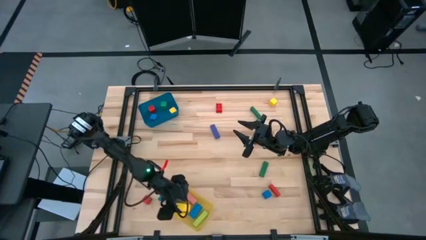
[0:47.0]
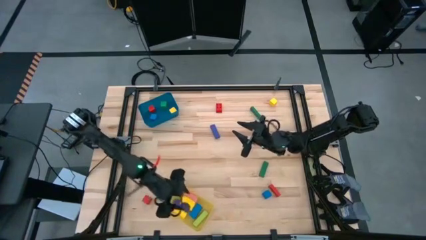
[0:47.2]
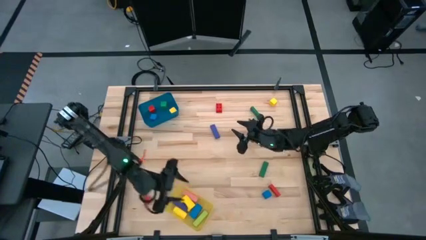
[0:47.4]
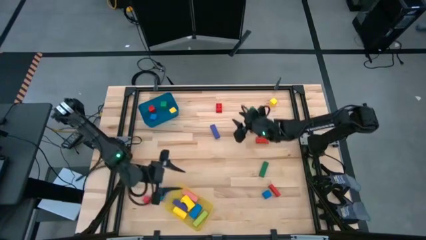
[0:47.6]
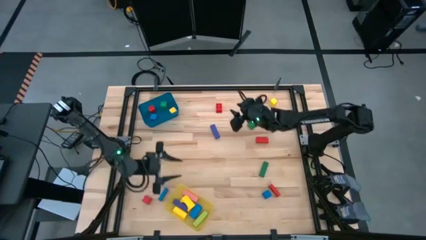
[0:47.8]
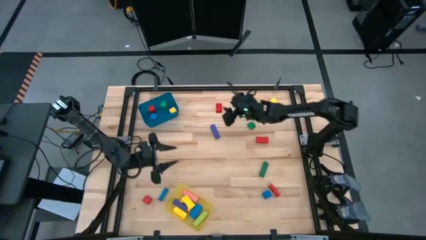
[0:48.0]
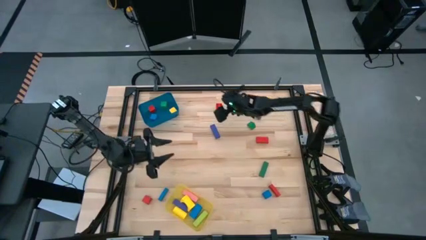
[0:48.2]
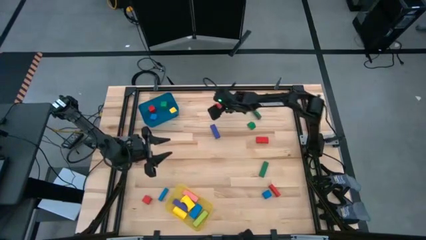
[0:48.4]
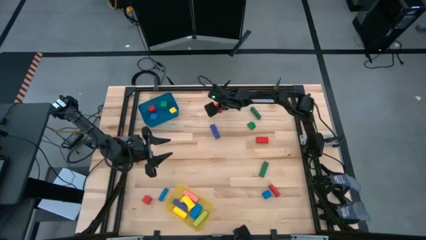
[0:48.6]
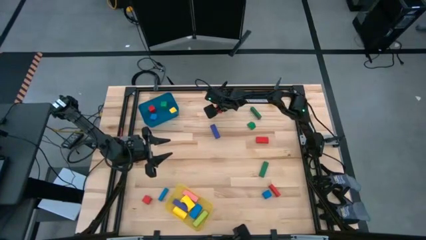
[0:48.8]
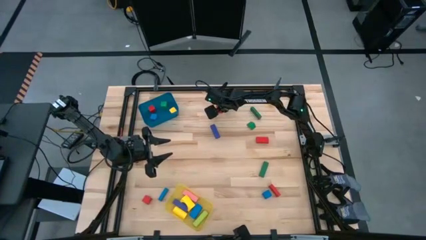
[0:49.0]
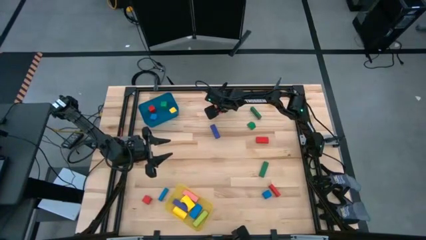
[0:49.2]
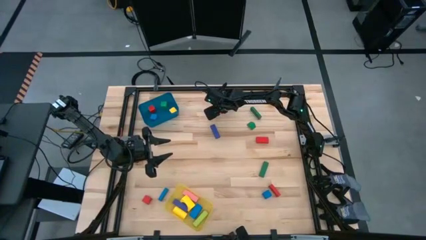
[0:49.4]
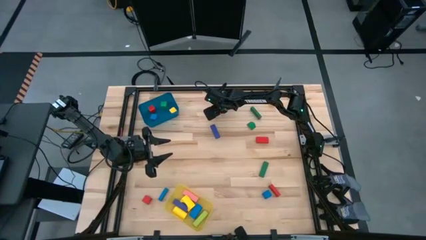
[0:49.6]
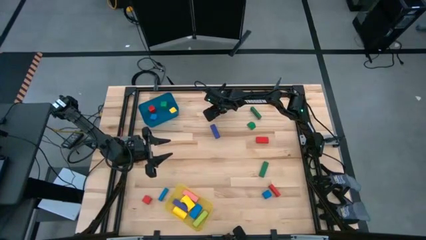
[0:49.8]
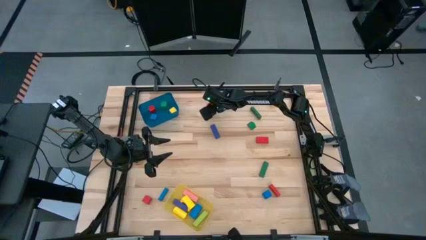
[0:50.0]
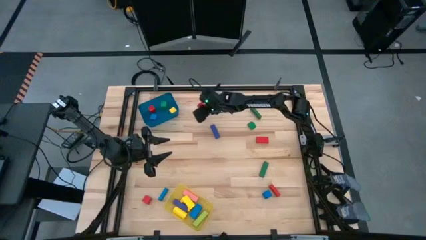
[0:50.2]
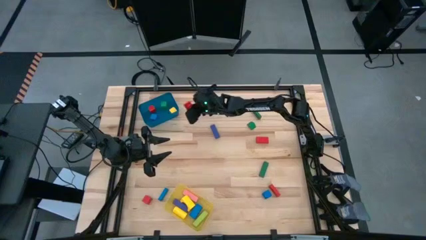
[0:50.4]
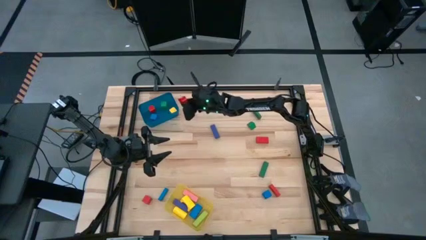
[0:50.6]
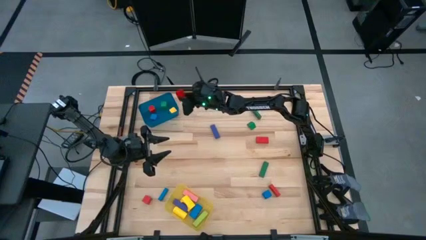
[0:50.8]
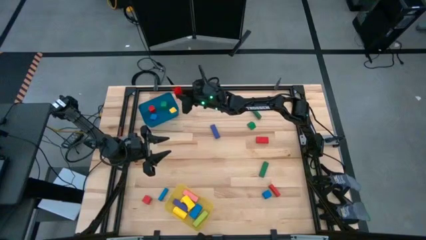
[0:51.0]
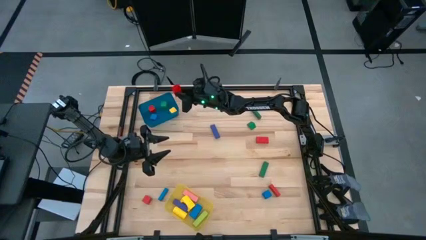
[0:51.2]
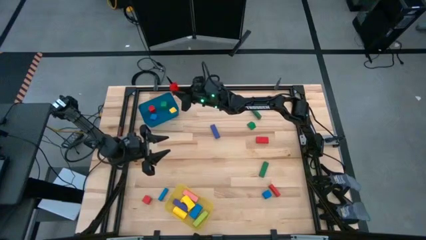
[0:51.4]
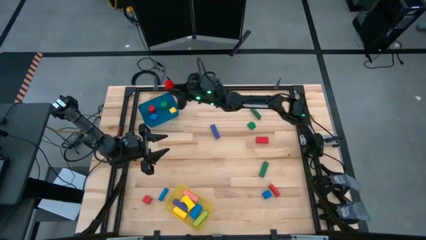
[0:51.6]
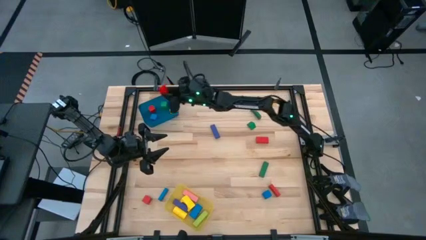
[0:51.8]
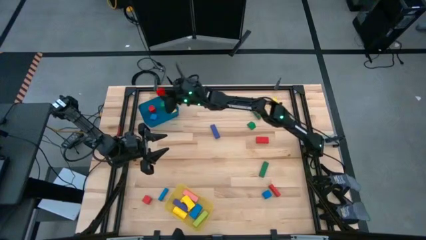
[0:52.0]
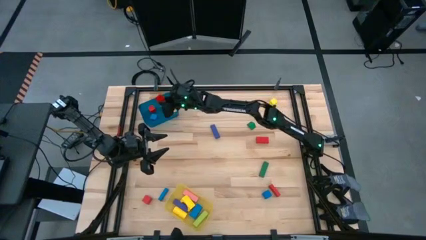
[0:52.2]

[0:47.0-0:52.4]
Task: Sort blocks by size
Put the small red game piece into the blue bin

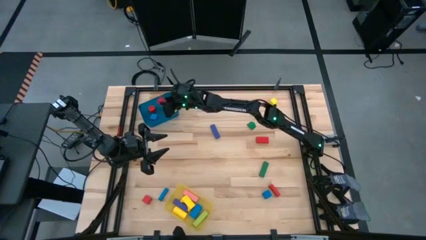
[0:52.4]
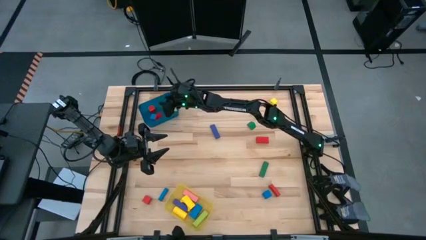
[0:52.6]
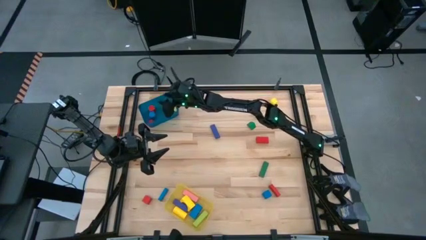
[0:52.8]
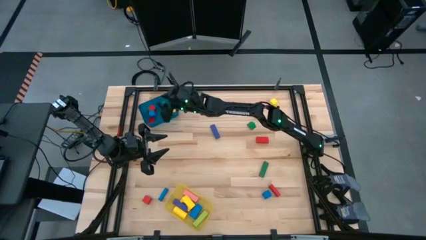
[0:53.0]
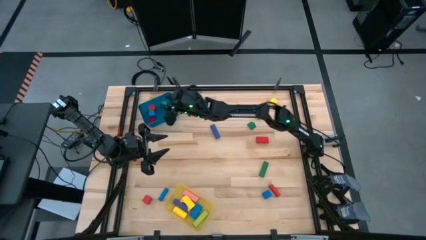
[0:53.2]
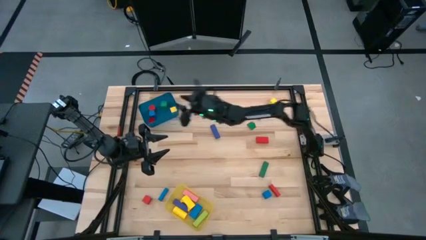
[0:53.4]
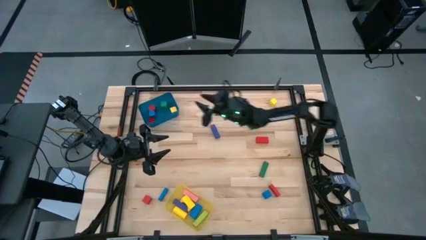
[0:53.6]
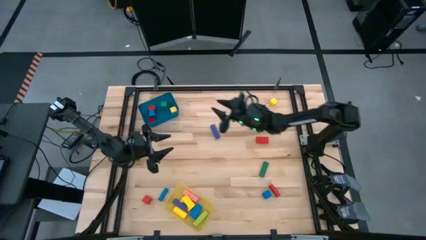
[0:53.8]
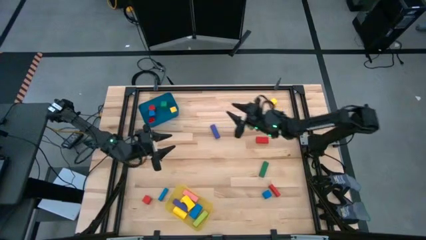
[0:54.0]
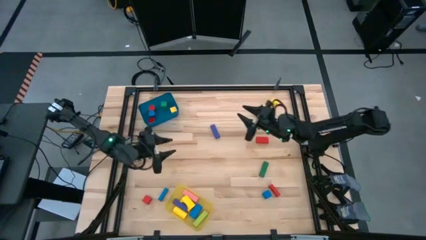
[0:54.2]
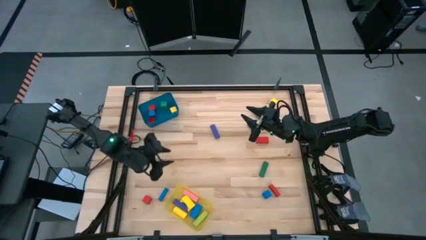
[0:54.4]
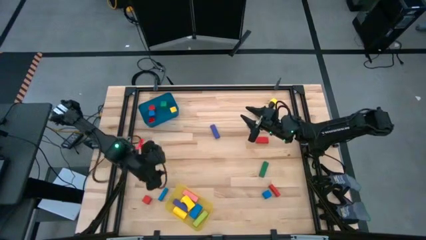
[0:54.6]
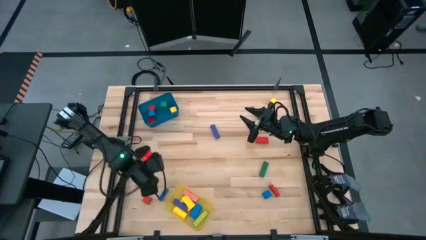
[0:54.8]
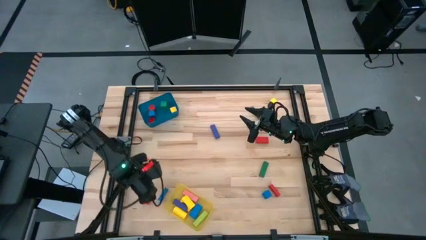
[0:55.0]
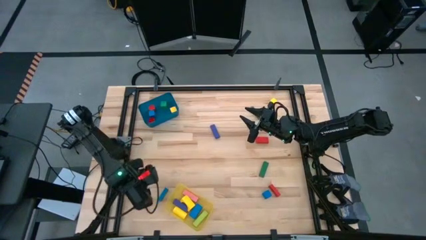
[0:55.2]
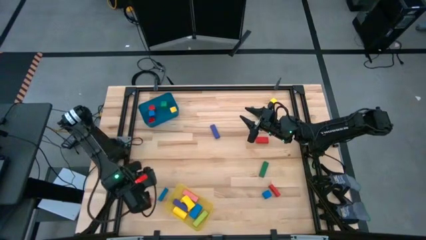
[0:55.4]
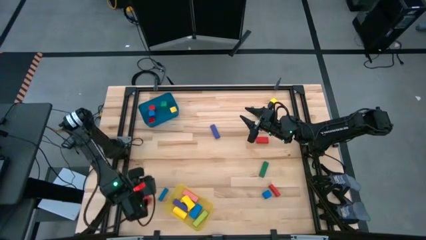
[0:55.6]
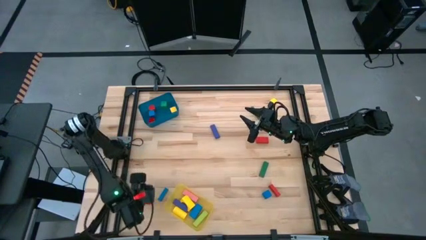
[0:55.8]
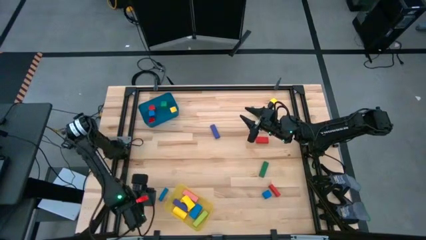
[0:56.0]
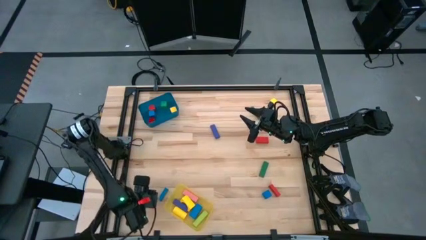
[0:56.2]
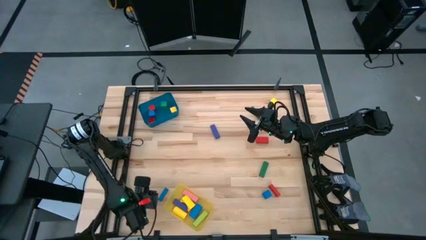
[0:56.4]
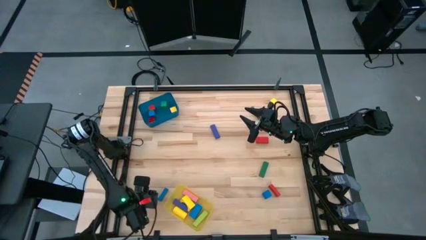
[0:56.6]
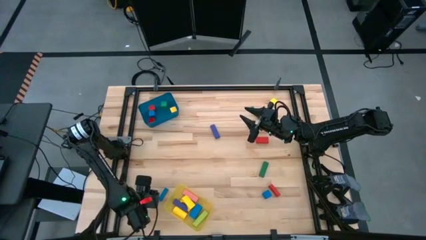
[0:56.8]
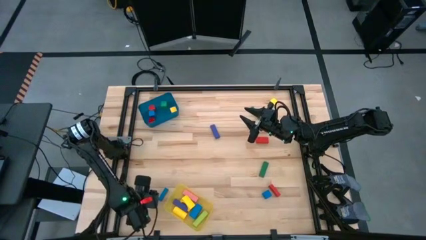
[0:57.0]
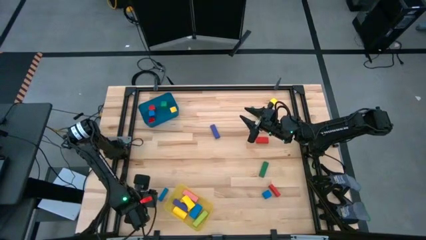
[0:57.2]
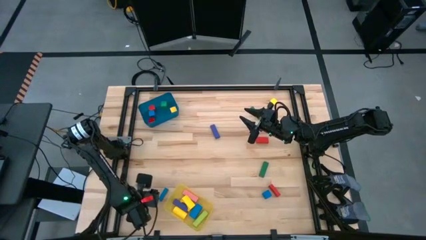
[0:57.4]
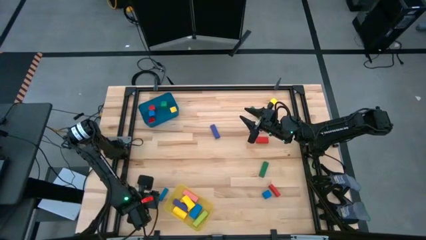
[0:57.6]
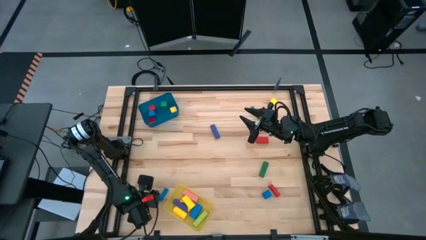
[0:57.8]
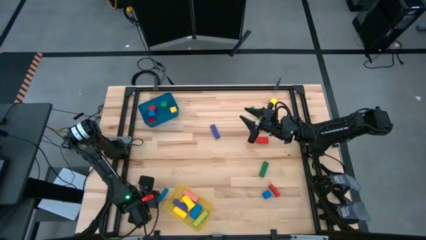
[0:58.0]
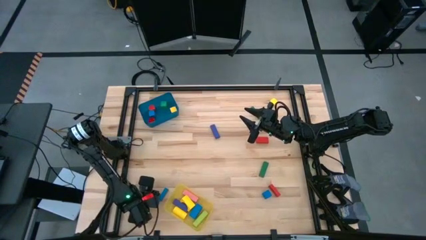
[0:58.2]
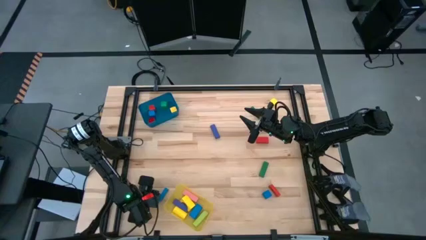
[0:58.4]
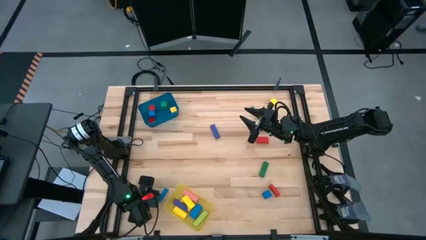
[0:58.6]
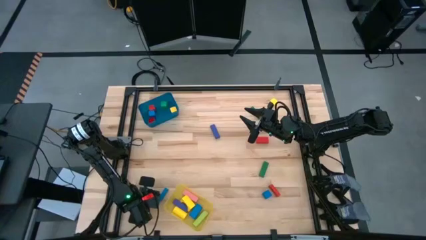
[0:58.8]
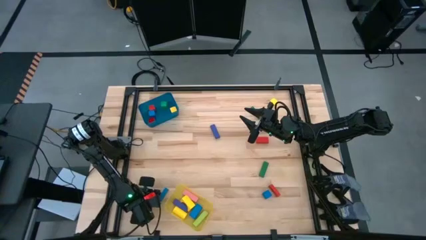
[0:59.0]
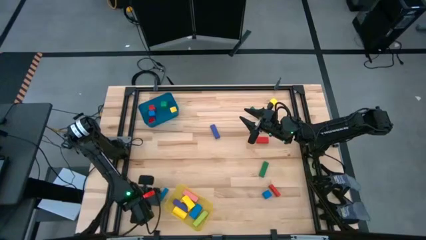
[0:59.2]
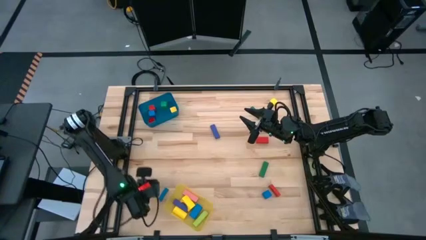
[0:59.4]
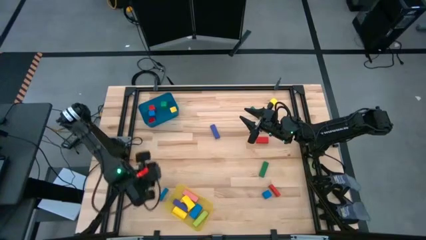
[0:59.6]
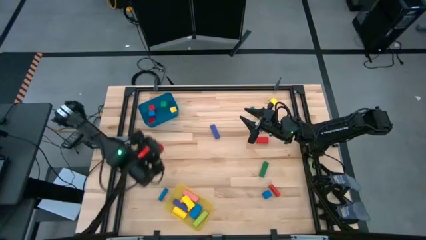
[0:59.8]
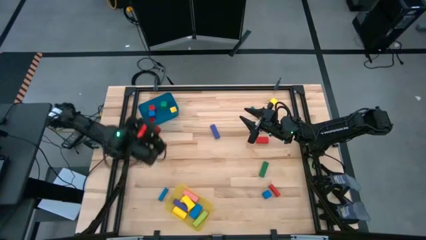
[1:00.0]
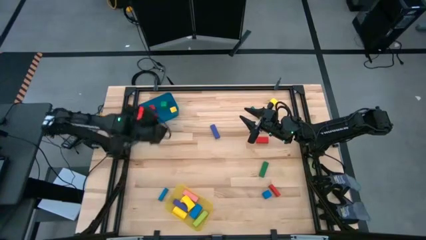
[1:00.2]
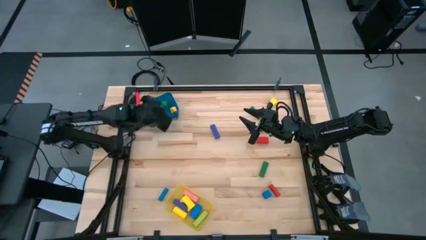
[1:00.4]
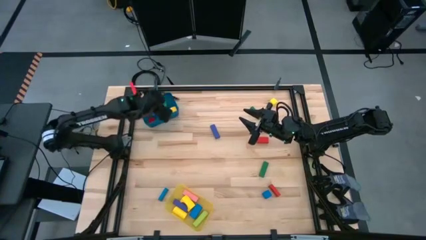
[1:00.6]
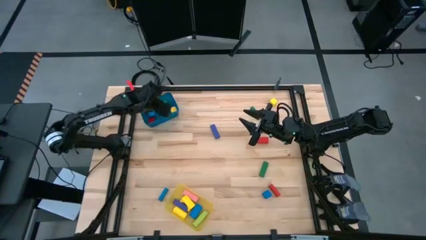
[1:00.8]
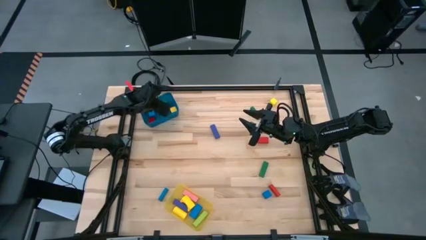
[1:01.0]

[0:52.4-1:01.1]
Put the small red block into the blue bin

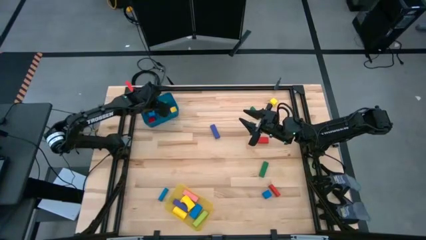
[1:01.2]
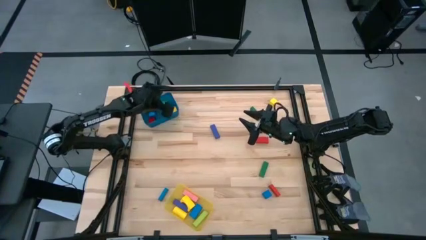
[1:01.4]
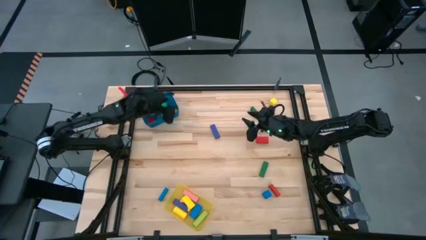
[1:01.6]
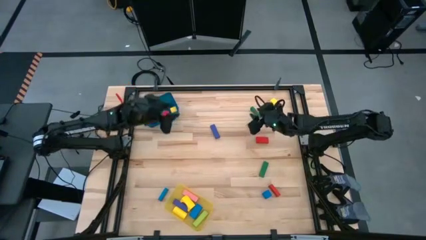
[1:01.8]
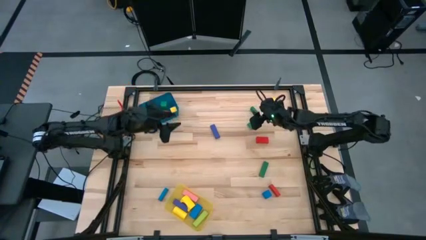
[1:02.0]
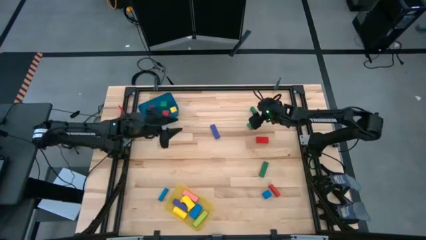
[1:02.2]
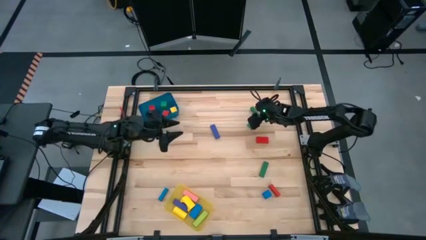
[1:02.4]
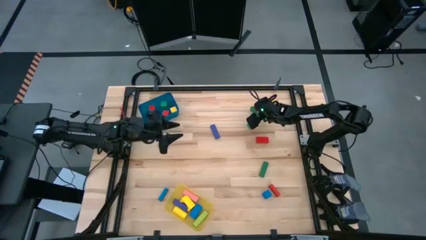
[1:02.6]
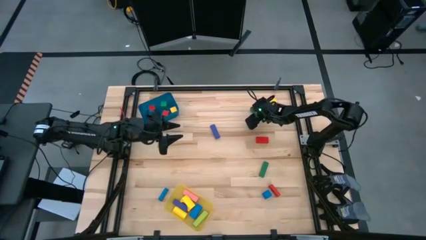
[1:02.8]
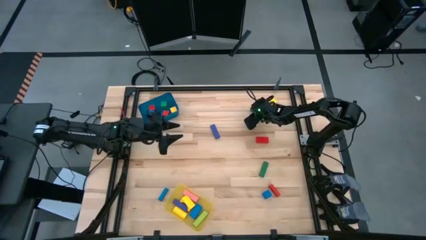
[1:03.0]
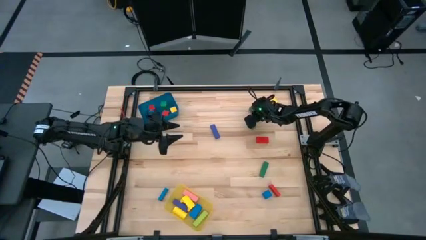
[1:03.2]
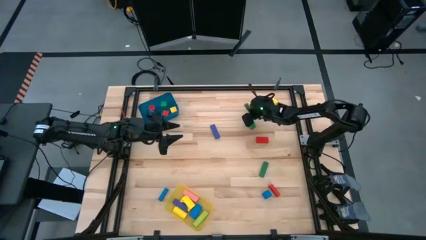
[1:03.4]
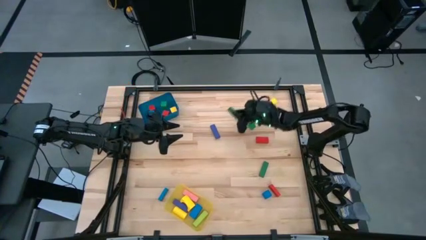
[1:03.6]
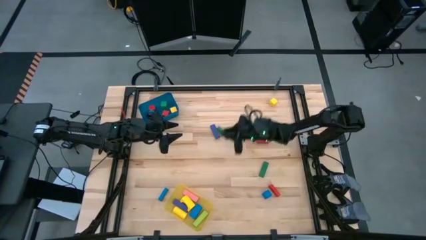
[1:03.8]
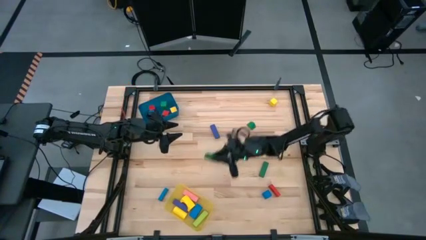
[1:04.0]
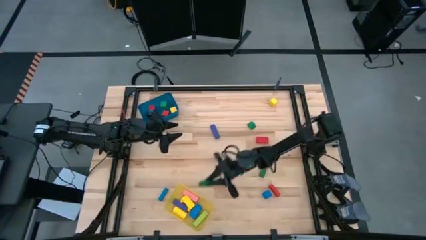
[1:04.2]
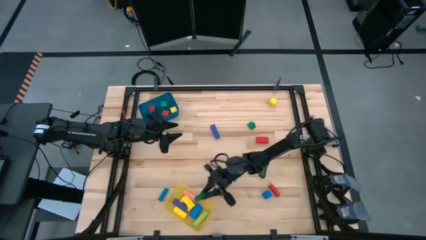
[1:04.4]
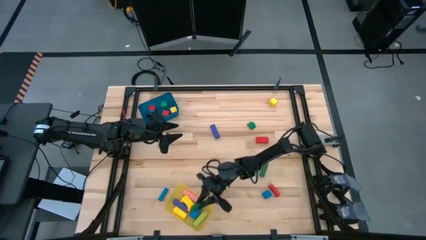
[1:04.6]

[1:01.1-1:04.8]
Put the top large green block into the yellow bin
